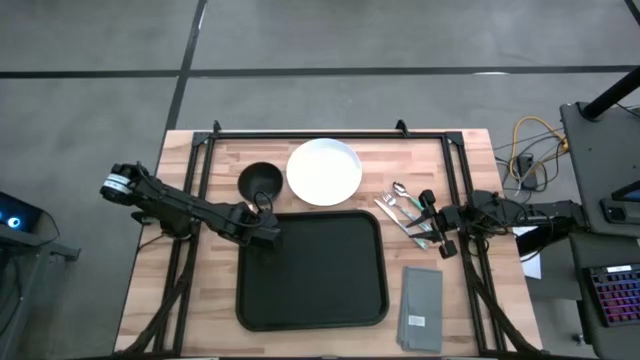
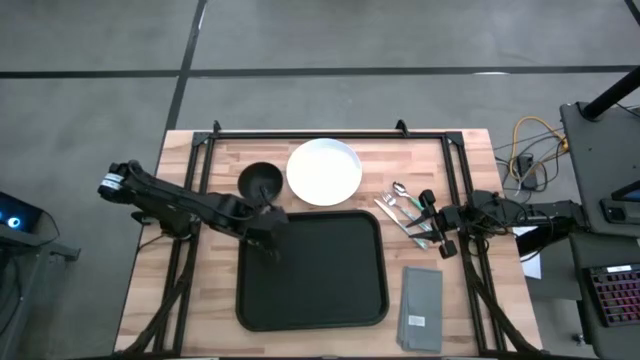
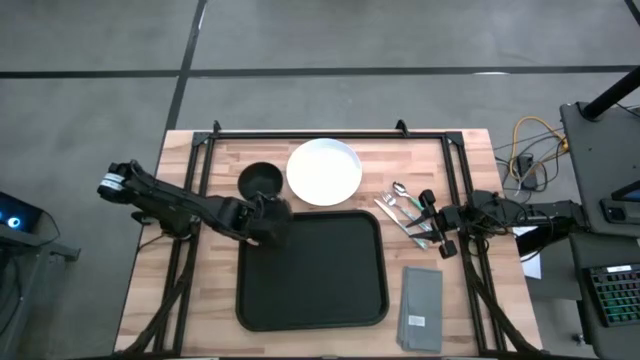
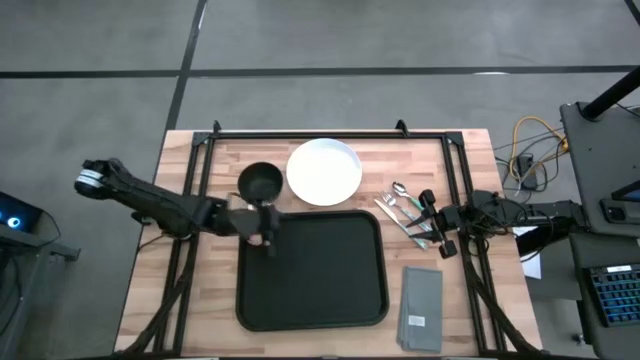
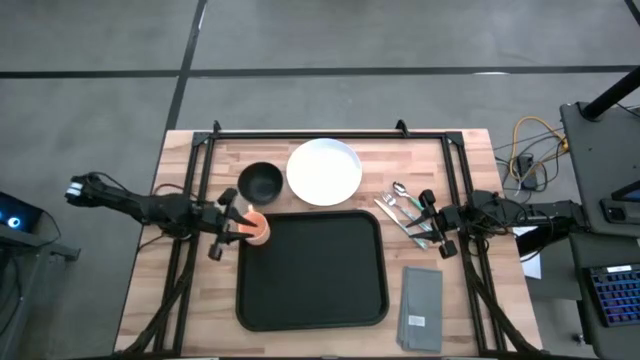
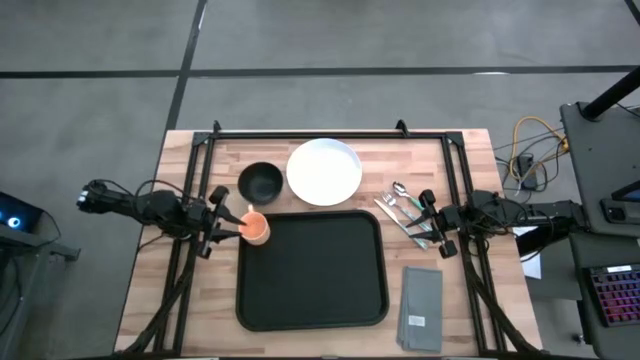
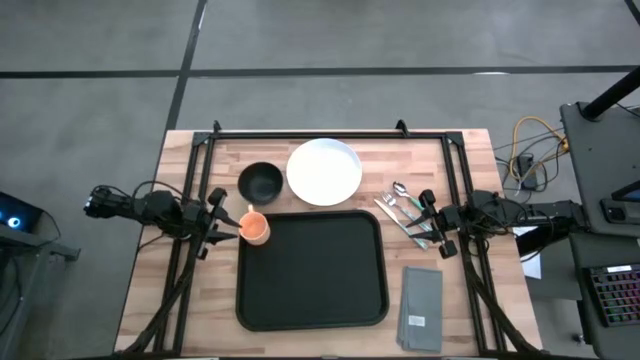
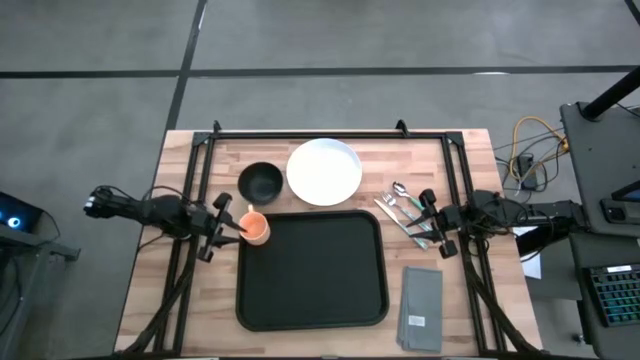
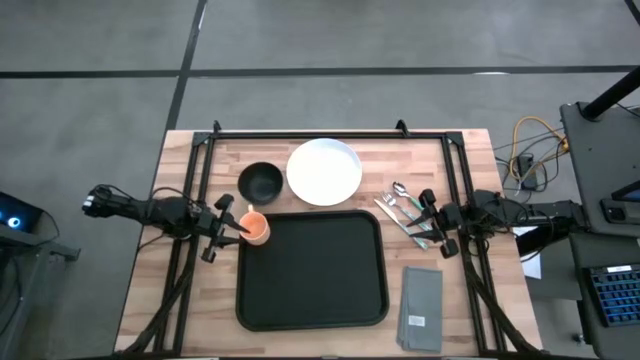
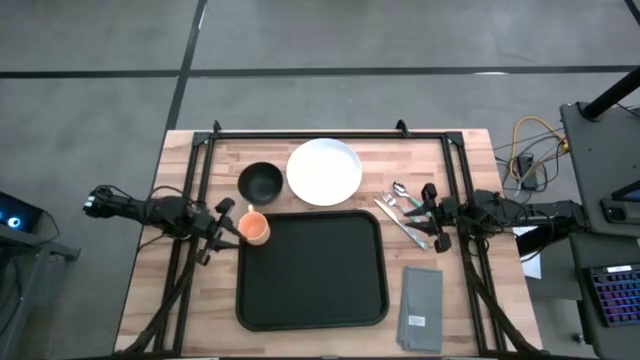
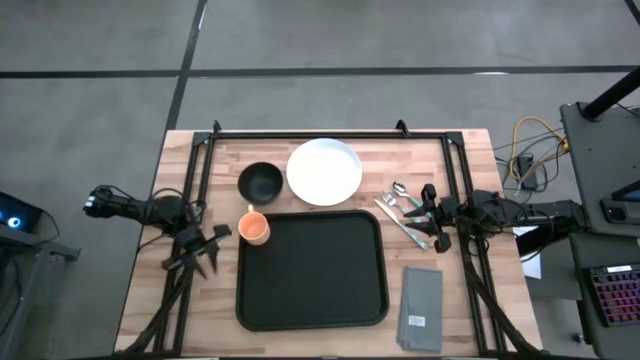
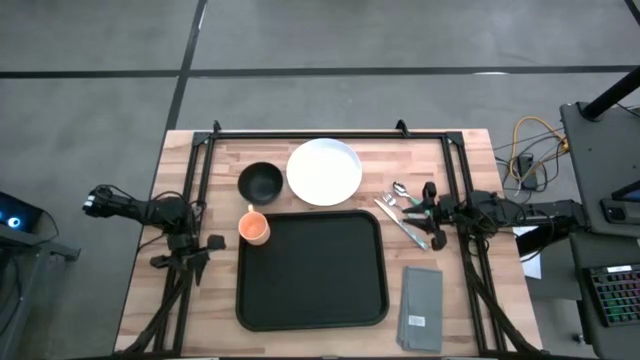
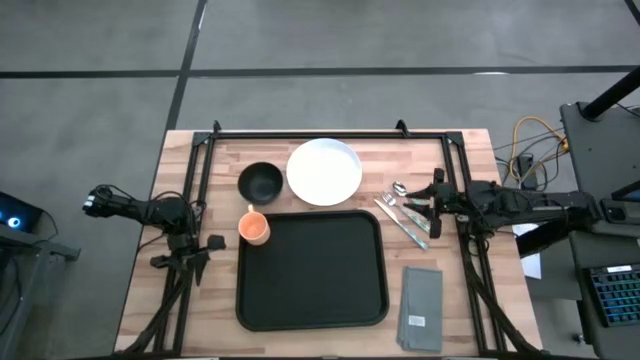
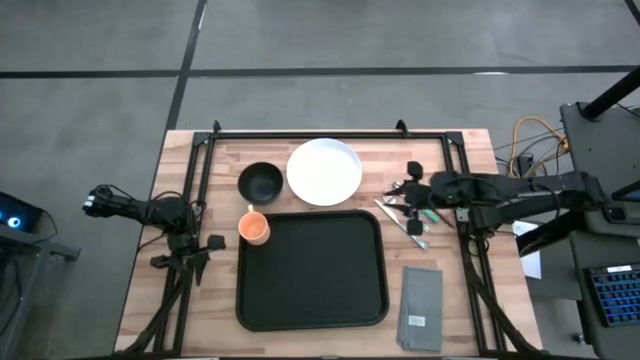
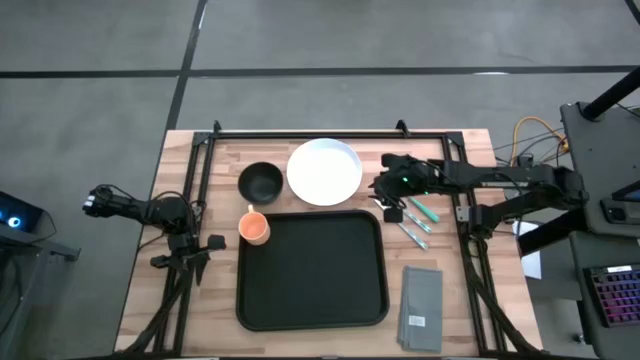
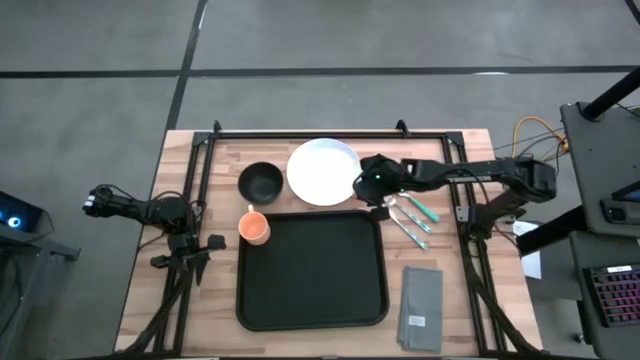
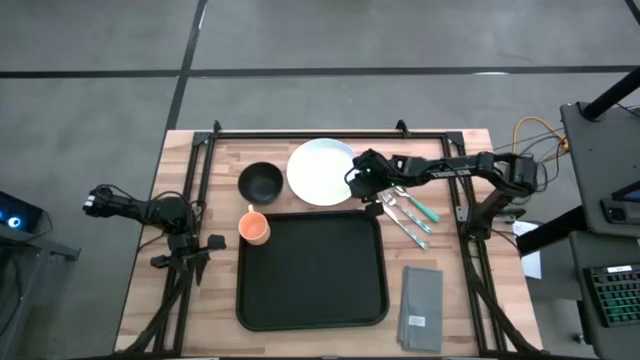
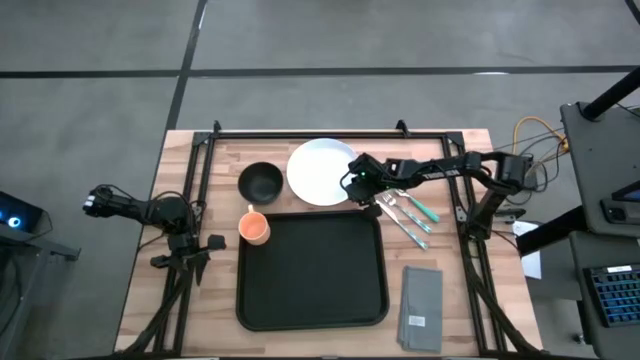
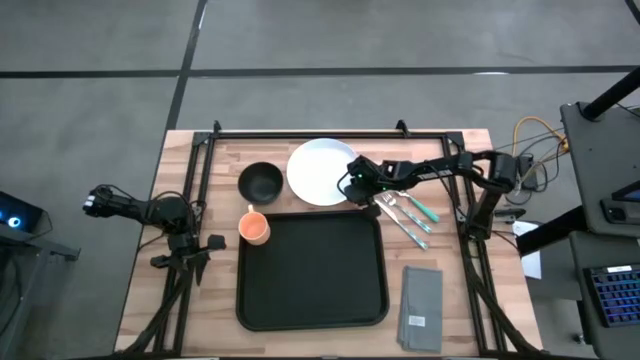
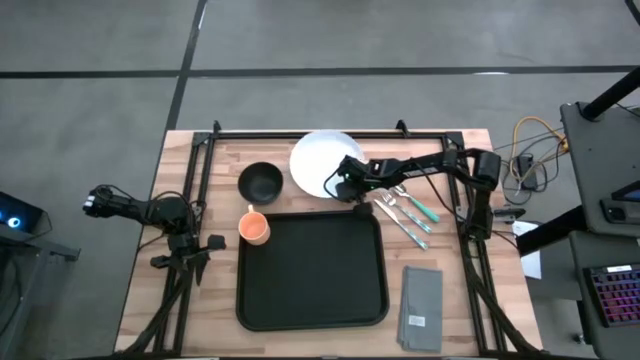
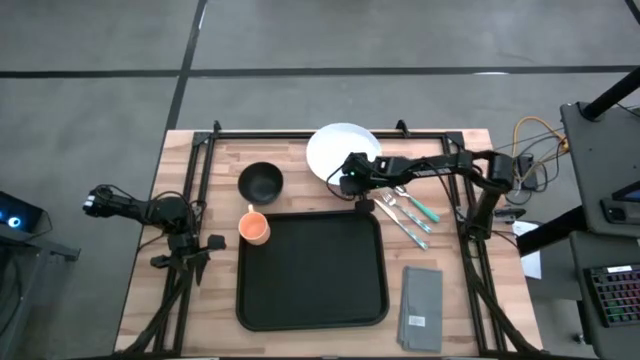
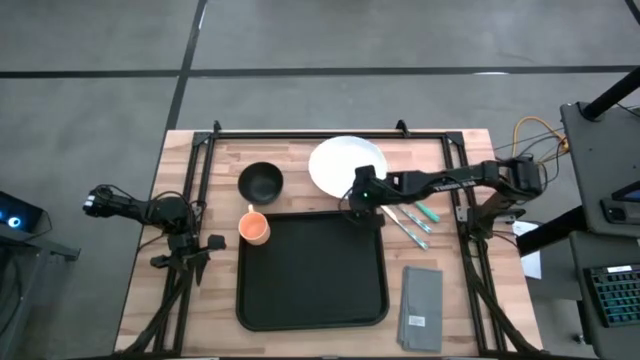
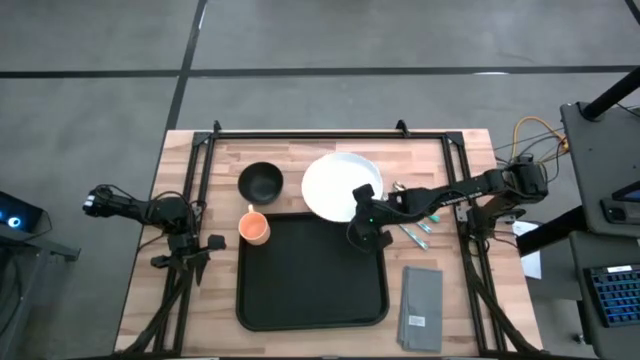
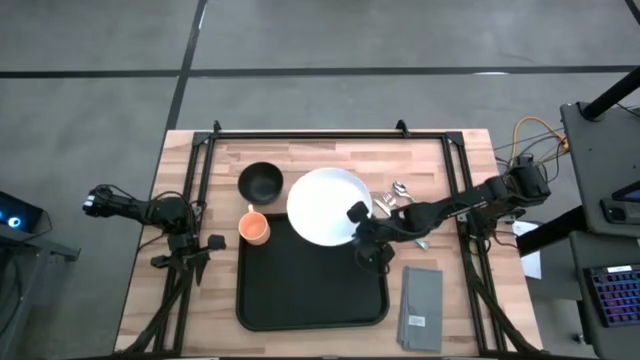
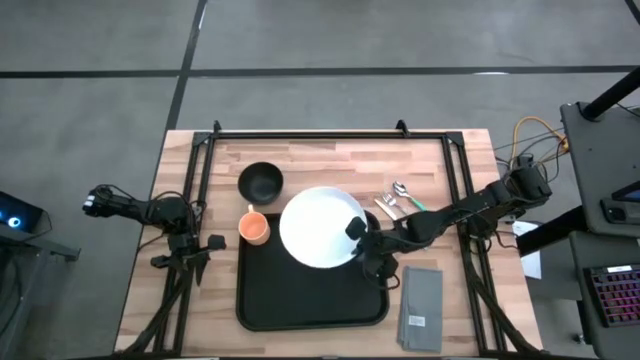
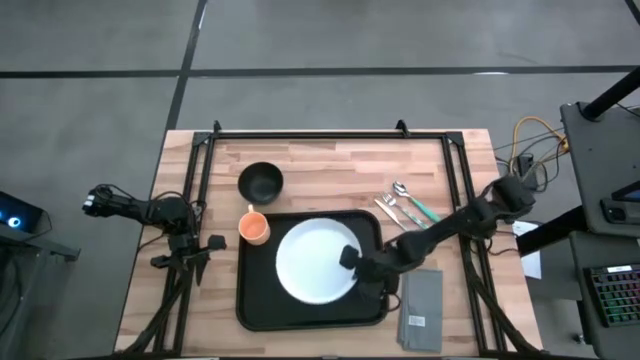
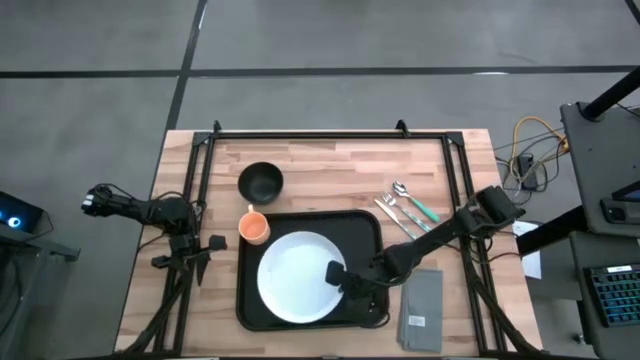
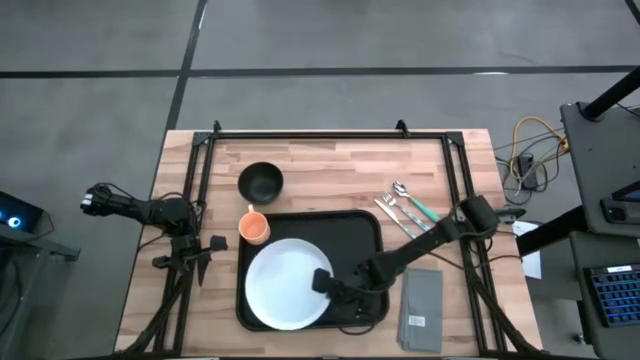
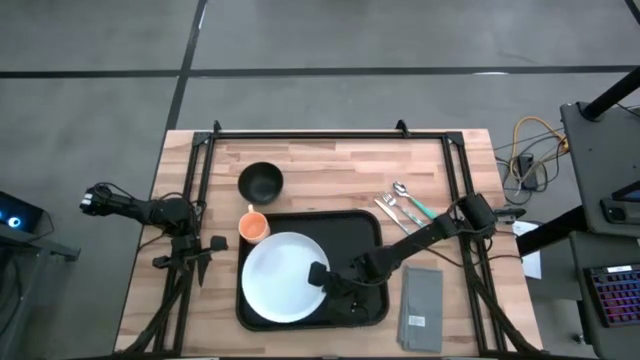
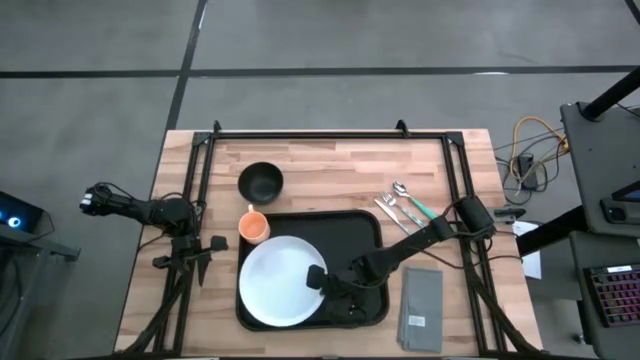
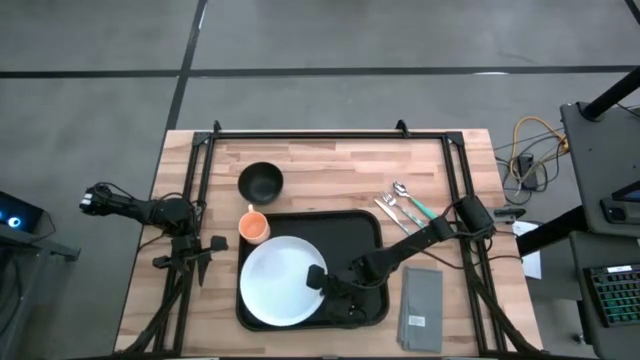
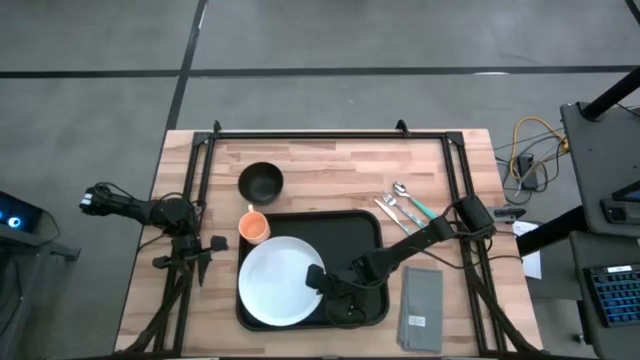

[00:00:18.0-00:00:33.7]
Task: Set up tray
Put the white plate to the bottom of the orange mug into the black table tray

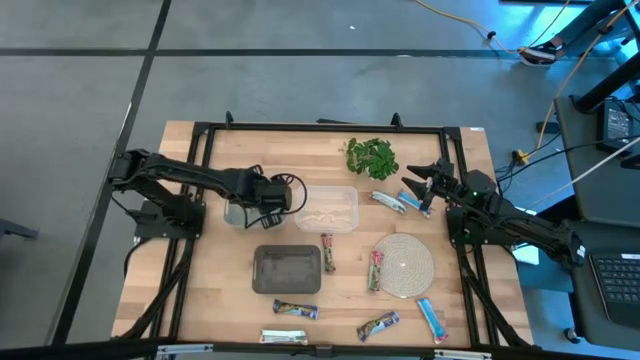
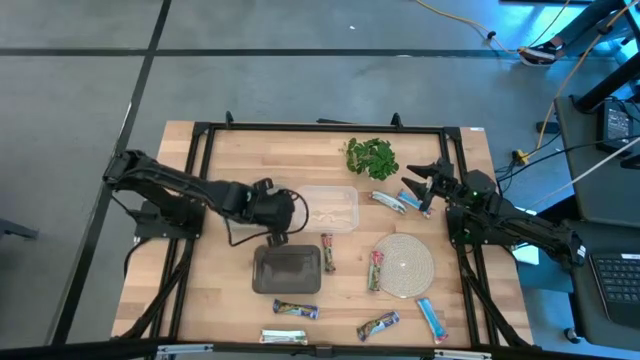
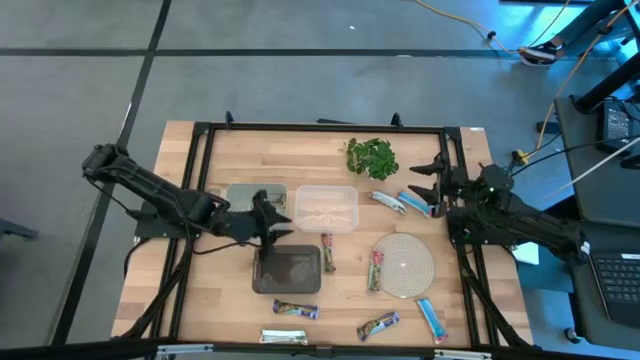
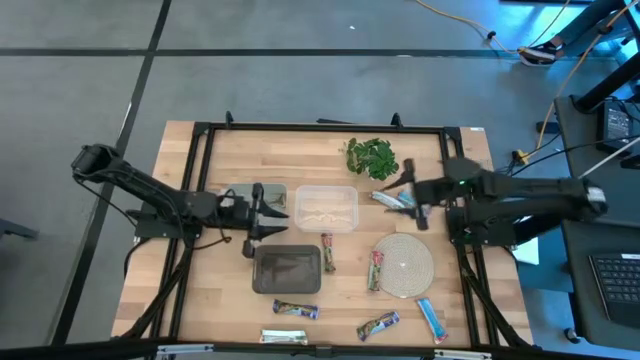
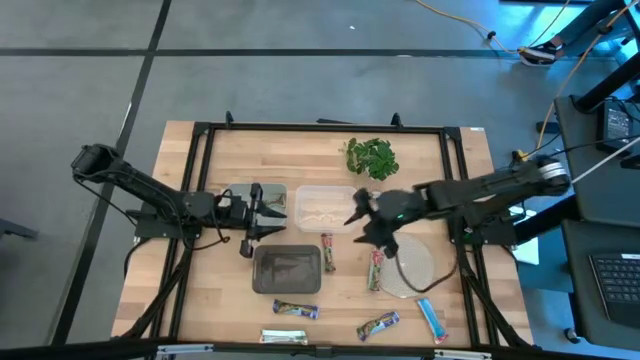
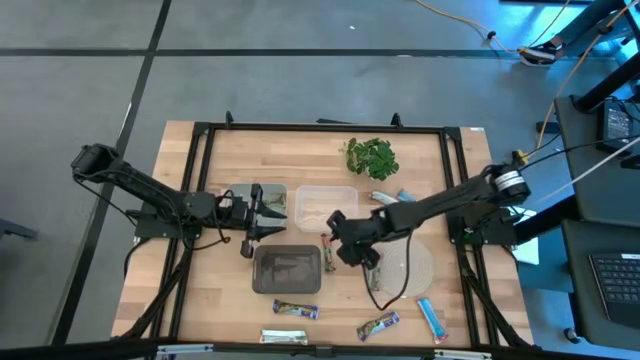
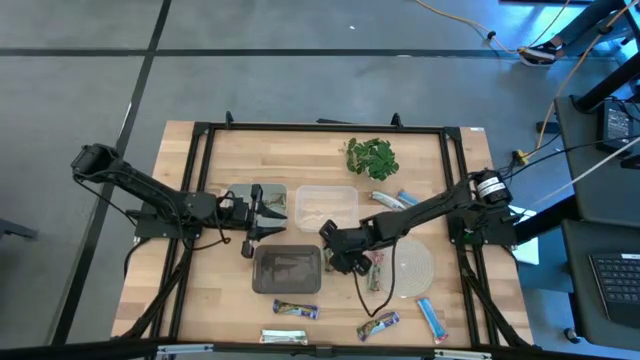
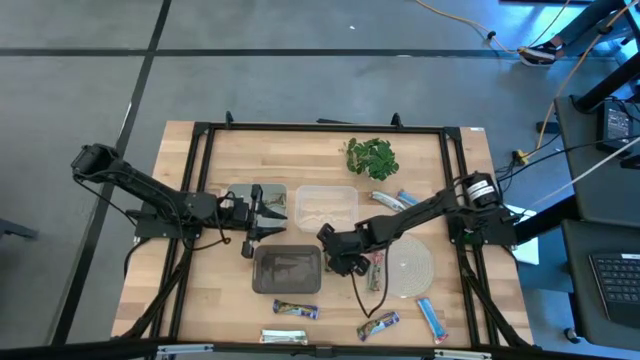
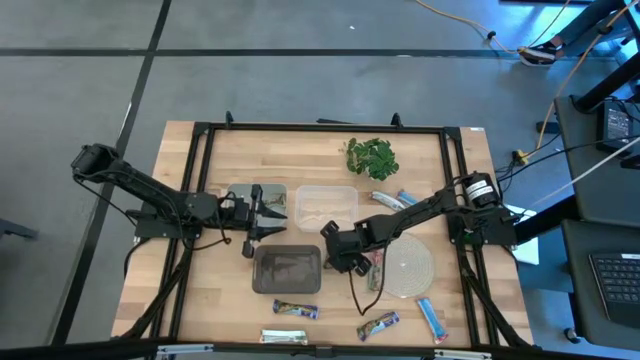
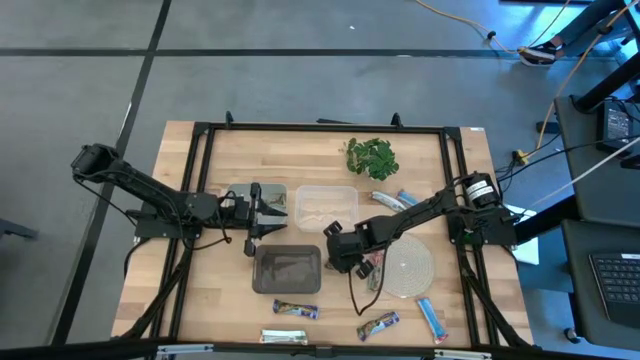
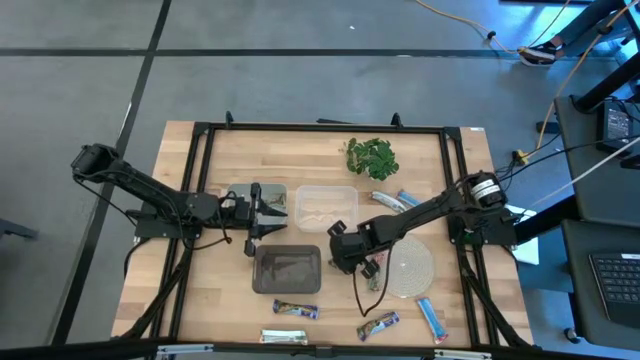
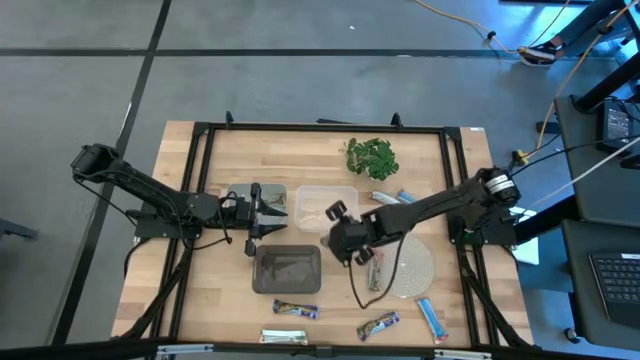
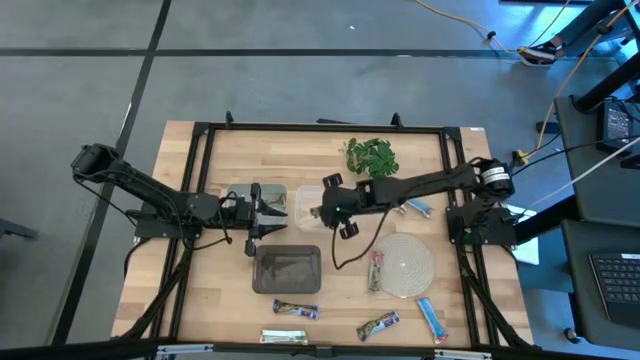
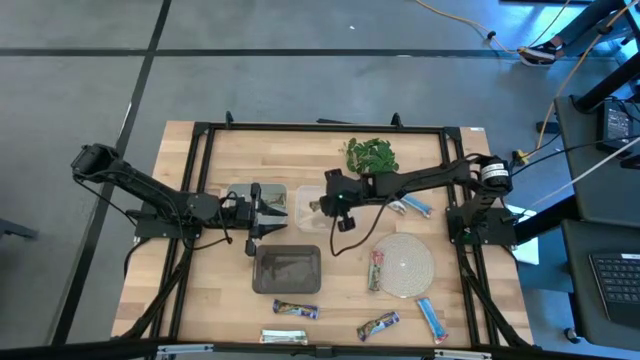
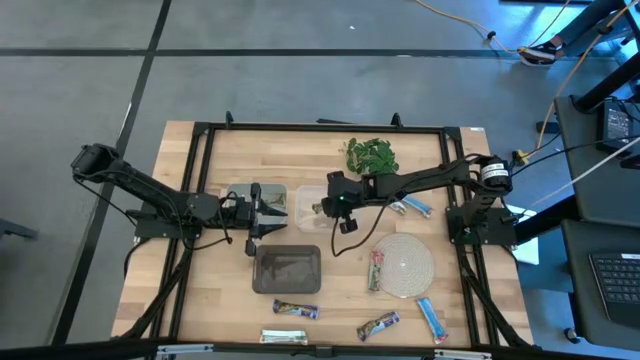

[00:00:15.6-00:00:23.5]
Task: Pick and place Granola Bars by type
Put the red granola bar into the white transparent bin
